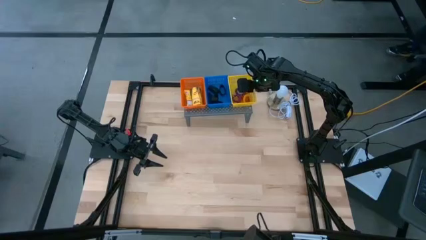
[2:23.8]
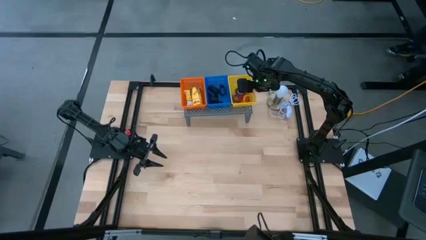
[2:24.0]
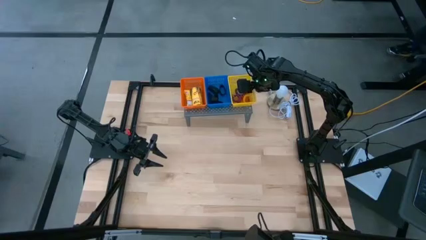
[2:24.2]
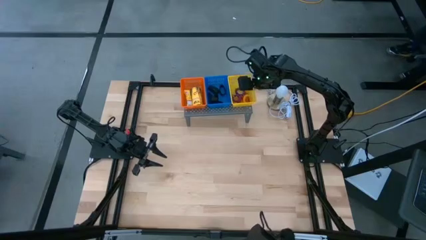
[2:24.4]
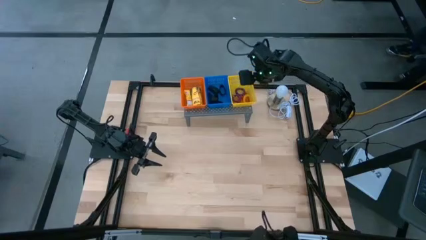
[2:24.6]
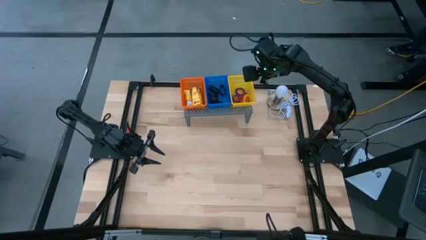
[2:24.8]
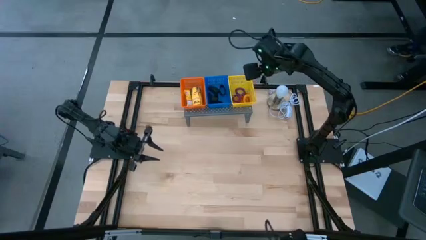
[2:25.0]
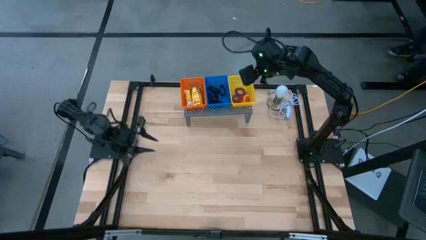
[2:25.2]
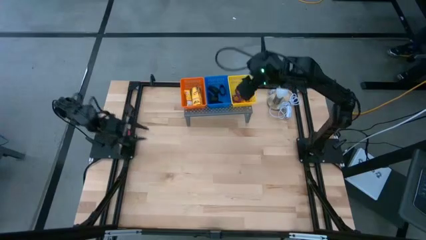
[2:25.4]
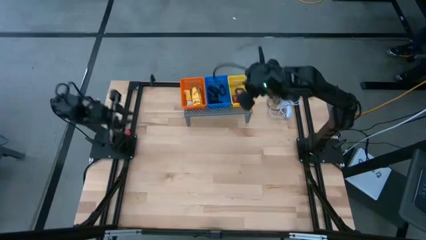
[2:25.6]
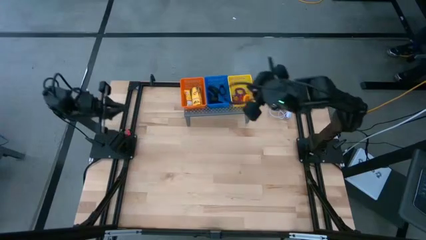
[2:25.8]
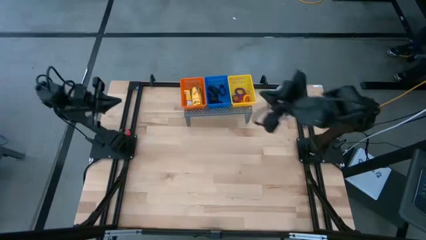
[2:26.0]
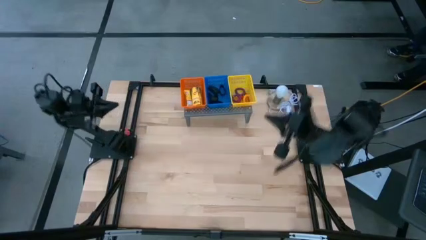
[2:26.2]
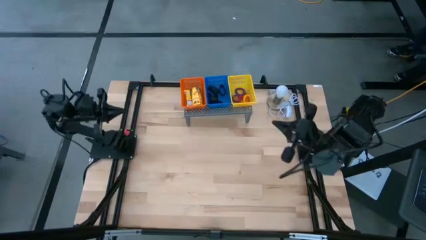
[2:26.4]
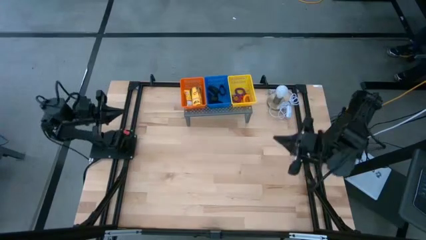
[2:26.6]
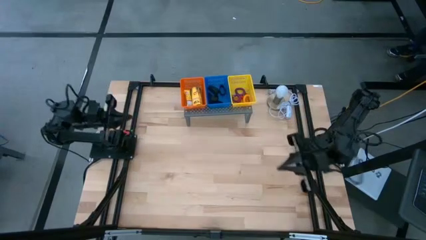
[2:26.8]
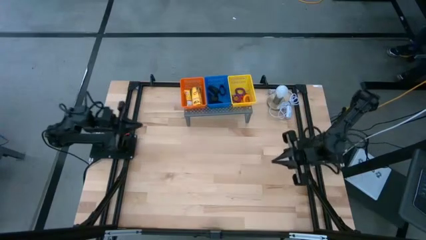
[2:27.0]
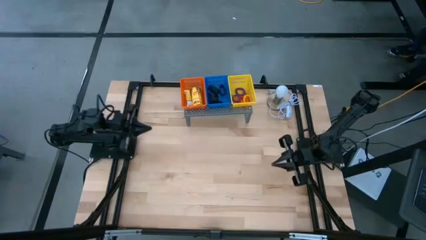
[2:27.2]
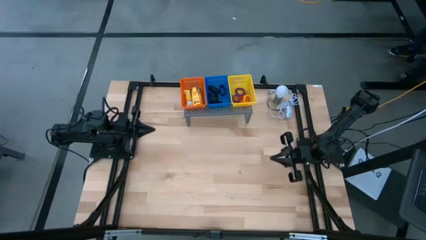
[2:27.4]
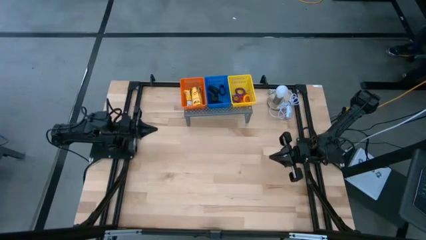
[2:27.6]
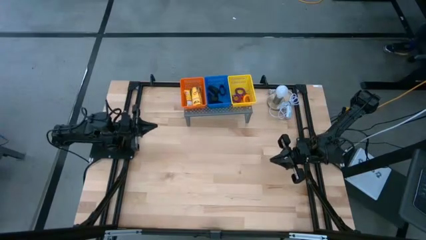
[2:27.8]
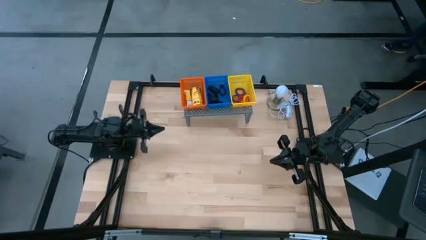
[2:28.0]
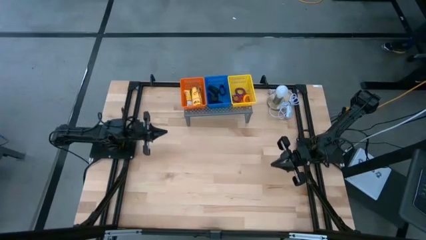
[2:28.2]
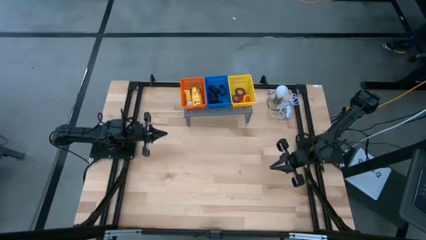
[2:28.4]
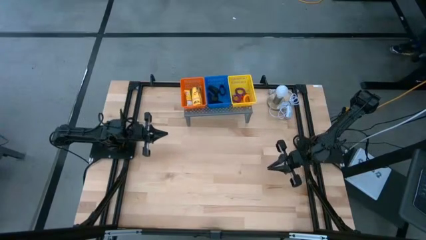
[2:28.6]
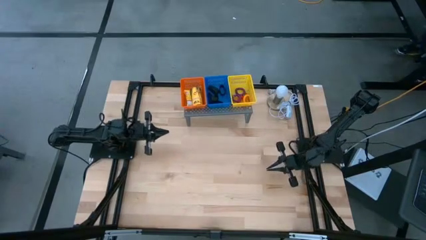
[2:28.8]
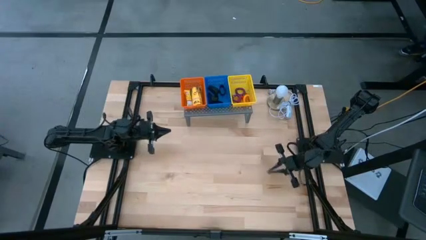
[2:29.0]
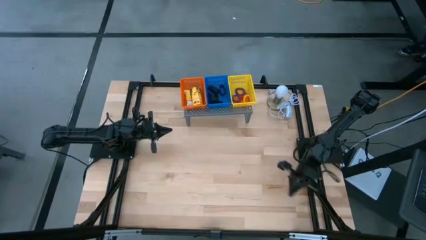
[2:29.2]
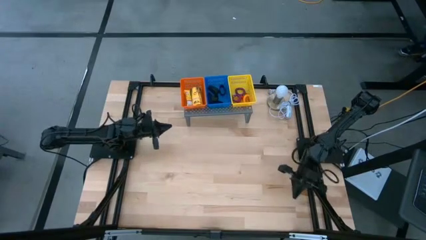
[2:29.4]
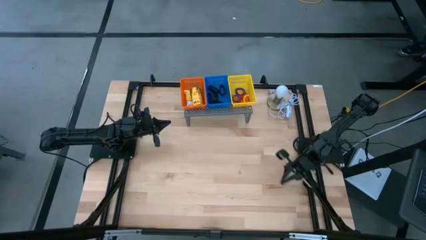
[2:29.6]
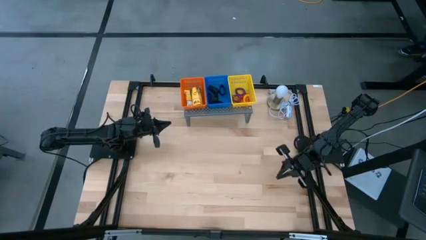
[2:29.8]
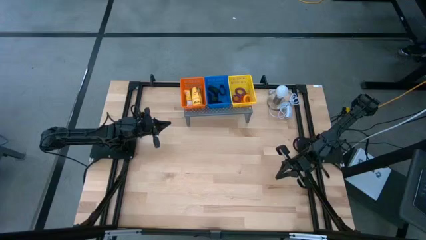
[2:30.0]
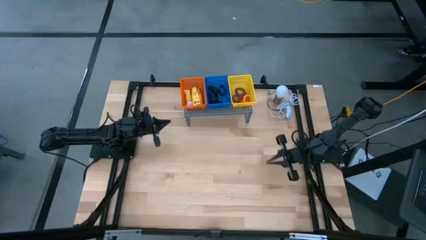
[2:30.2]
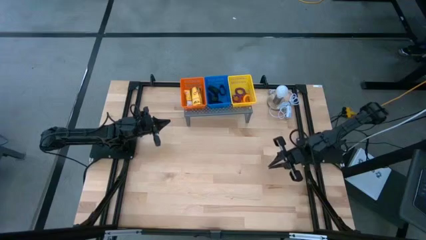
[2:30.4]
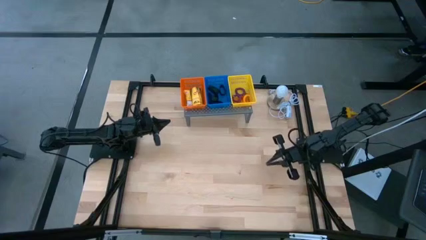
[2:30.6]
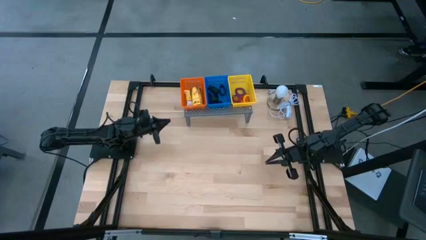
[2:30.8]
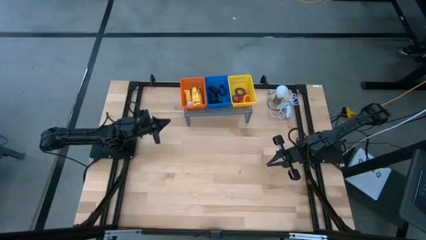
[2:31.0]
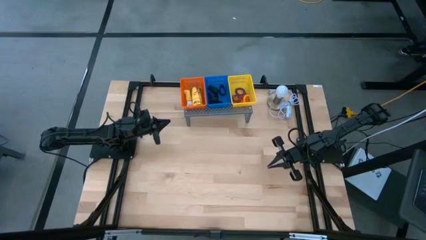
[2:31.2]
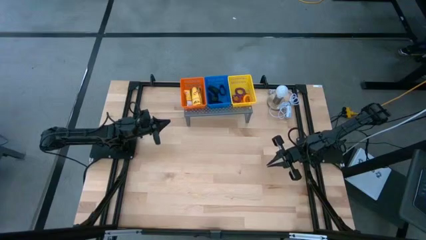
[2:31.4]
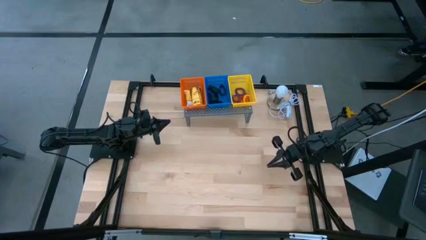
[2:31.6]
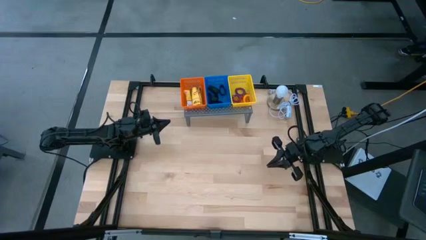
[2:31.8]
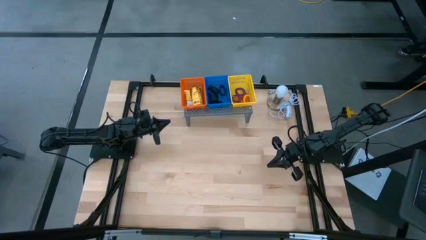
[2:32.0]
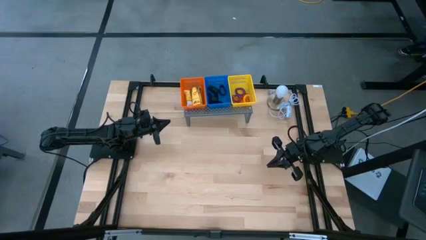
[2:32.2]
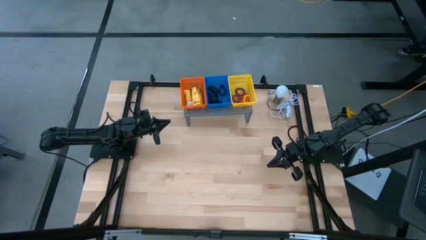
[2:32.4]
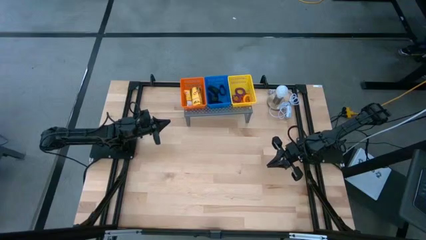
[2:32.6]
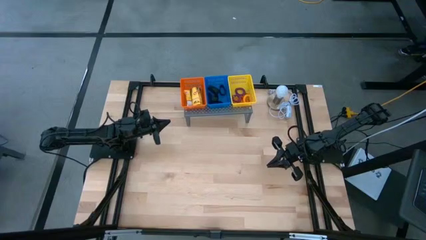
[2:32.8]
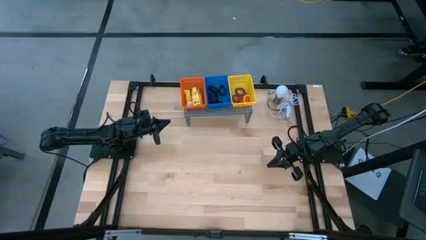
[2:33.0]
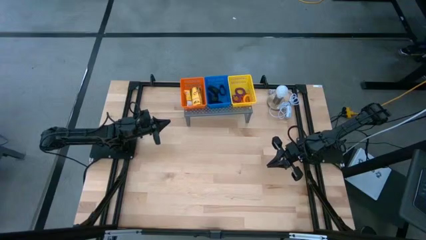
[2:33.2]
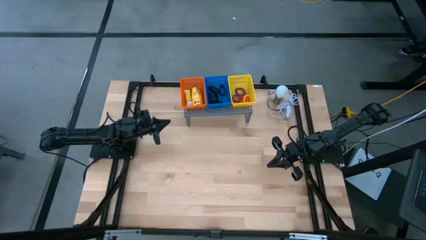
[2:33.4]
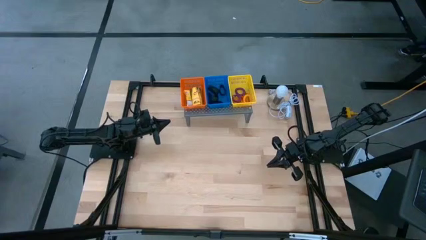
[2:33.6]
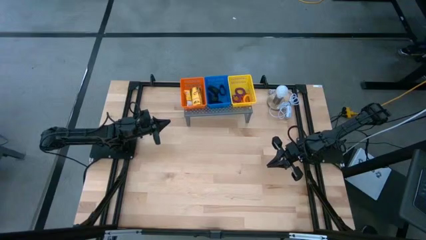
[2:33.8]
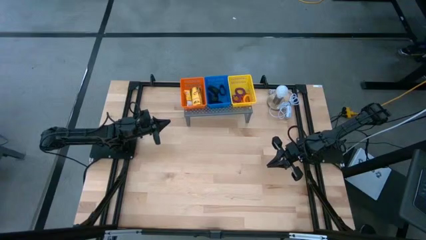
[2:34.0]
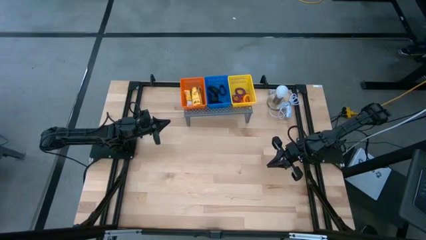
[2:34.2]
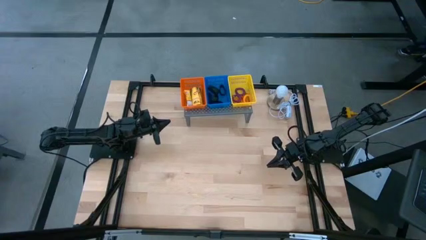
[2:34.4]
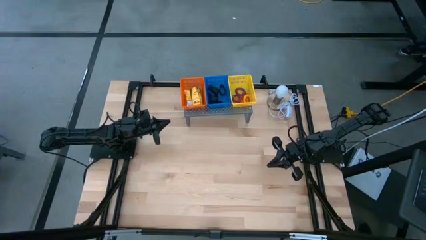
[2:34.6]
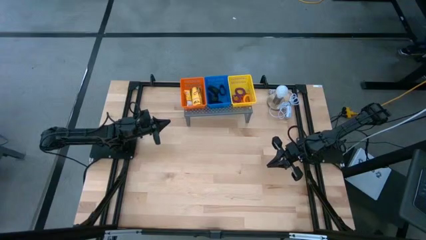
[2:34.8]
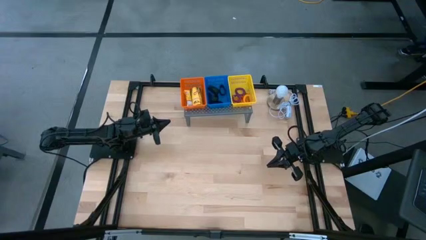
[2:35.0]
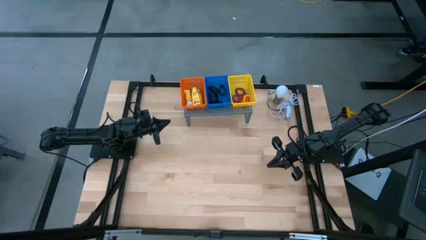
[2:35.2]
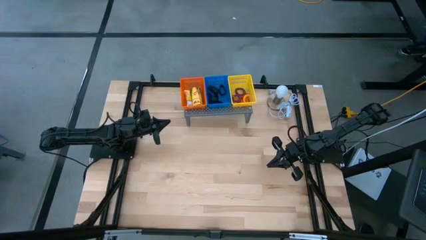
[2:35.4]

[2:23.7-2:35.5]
Task: Pick & Place Office Desk Supplies
Return to Home Position

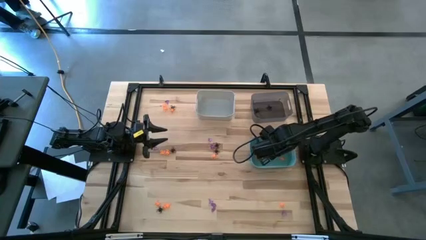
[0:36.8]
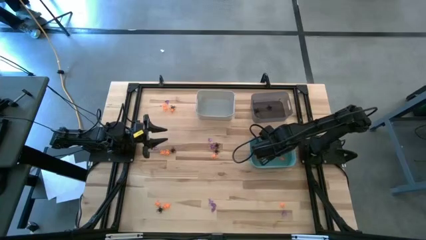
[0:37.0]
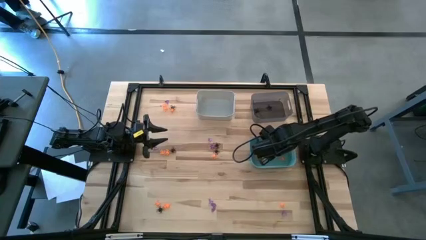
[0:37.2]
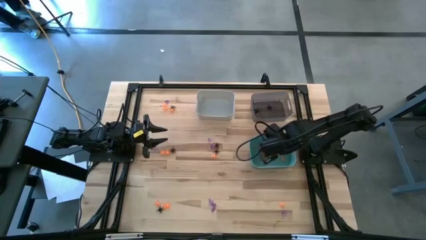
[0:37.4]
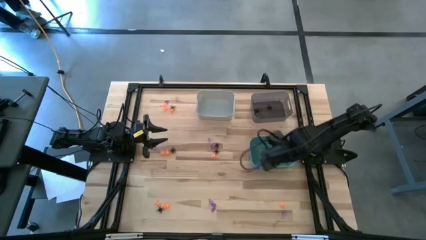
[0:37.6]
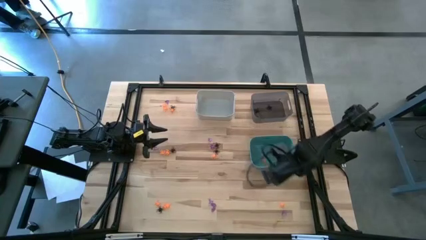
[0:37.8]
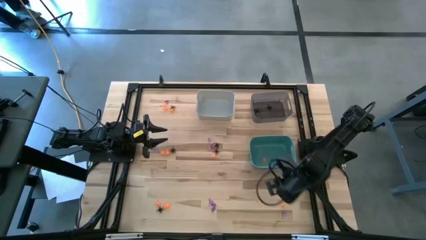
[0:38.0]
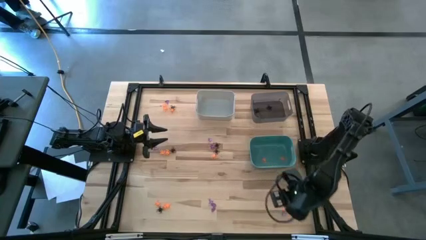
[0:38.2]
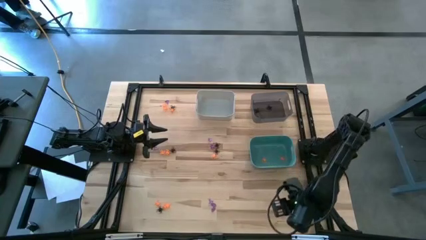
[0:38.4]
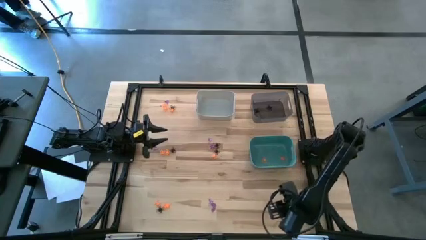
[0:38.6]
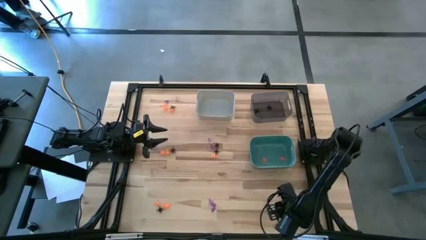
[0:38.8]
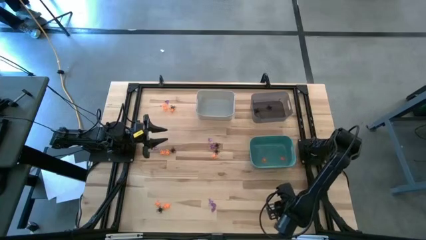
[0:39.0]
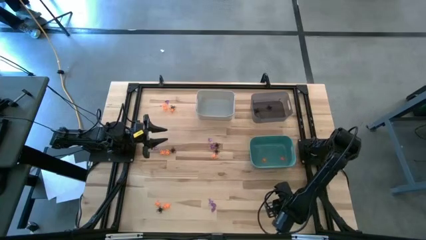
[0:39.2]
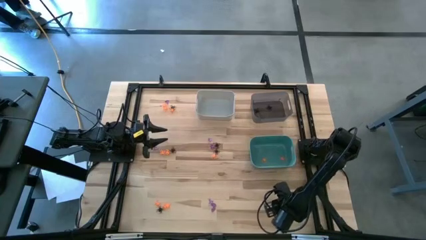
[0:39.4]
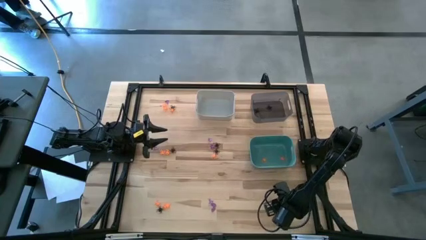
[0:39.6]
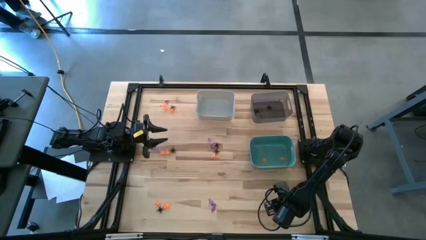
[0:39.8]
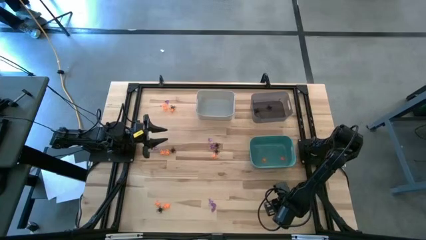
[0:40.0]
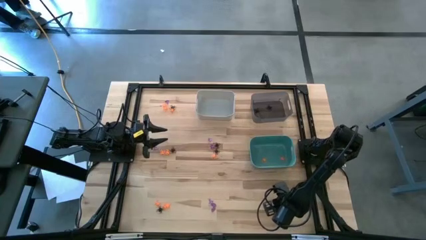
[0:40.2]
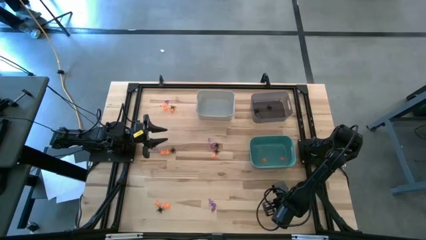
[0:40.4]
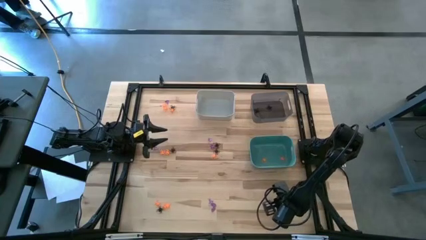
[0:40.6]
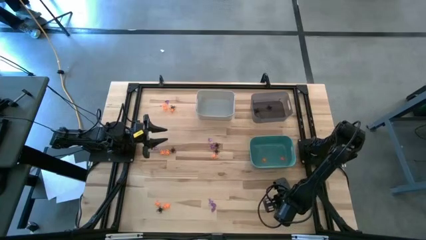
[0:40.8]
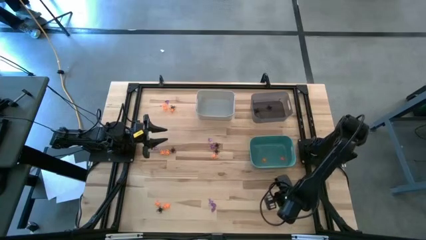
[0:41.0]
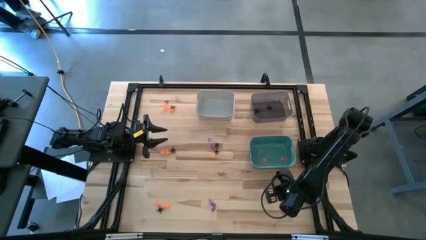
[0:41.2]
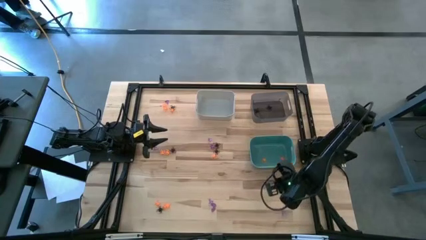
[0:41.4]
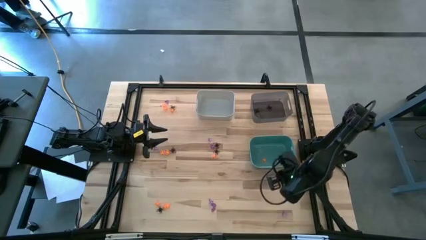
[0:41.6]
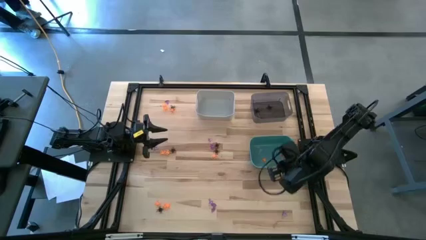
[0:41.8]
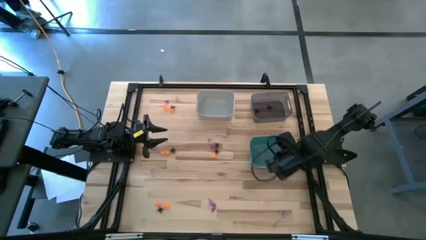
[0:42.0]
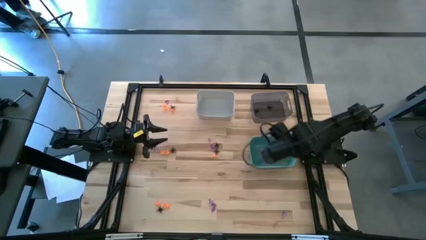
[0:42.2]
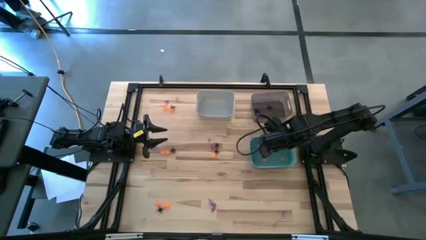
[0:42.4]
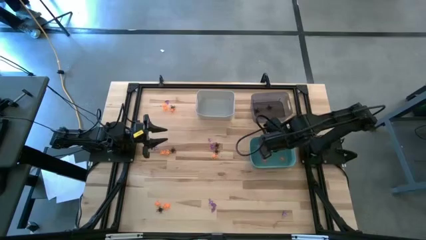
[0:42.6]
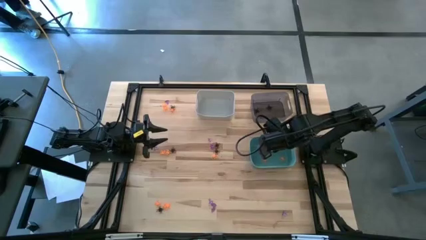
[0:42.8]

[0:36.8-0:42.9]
Task: Sort Halloween decoration
Put the orange spider toy into the green bin
